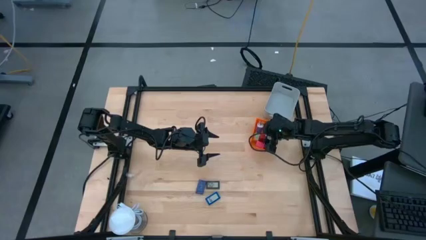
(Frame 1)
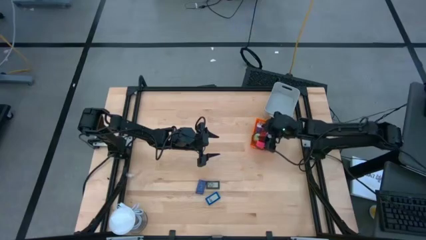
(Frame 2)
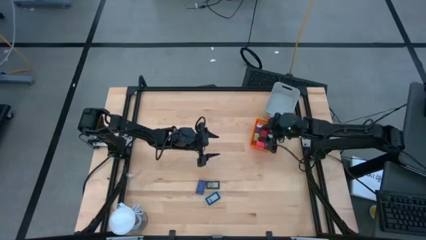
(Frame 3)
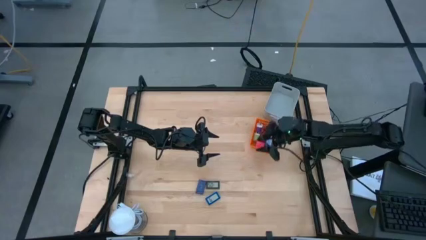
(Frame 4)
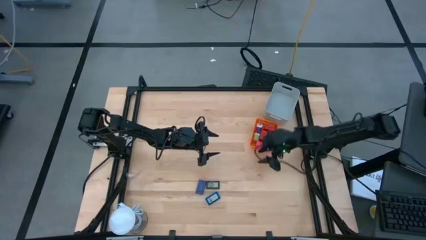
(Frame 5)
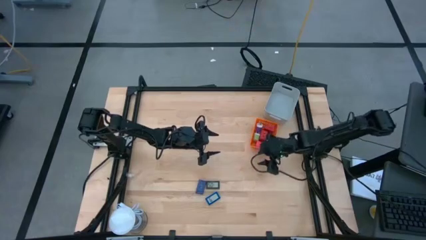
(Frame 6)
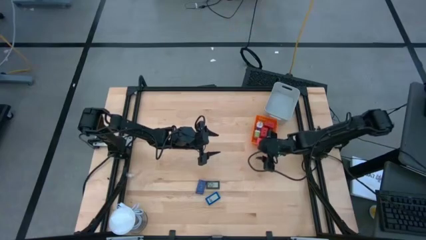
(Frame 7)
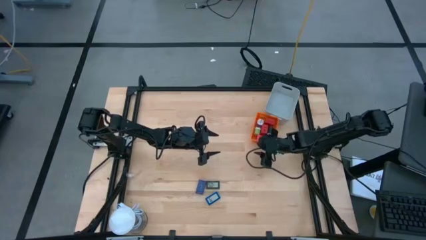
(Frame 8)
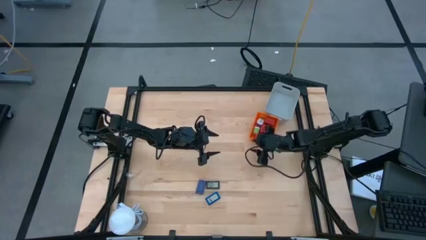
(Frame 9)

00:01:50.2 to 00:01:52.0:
Task: Pick & Place Office items
Adjust the orange bin

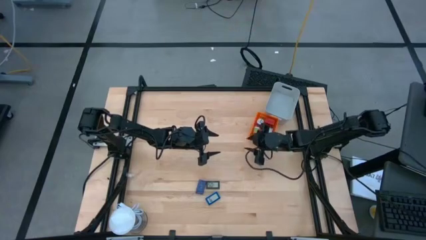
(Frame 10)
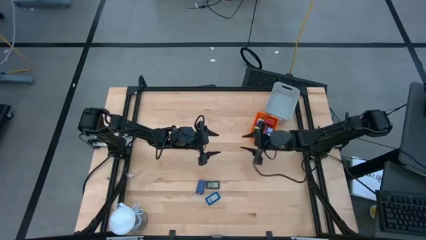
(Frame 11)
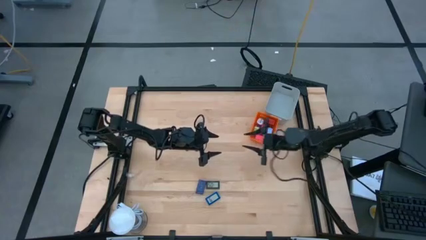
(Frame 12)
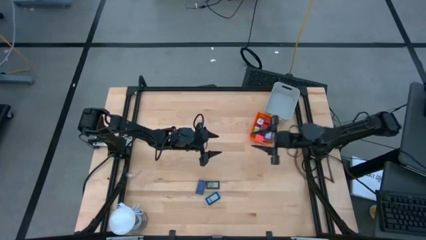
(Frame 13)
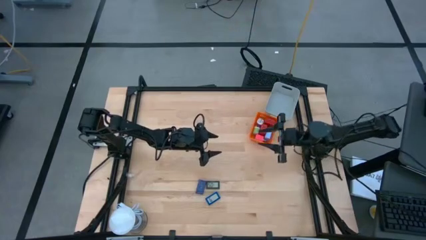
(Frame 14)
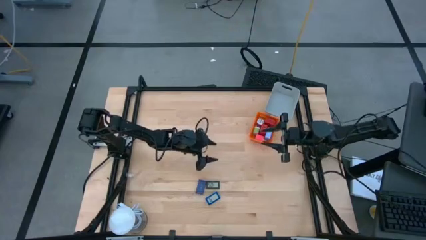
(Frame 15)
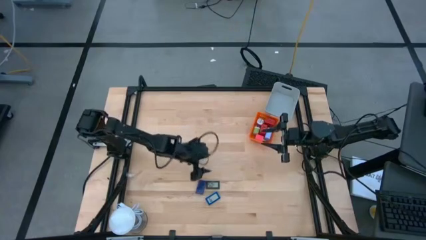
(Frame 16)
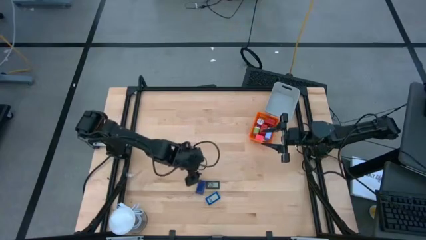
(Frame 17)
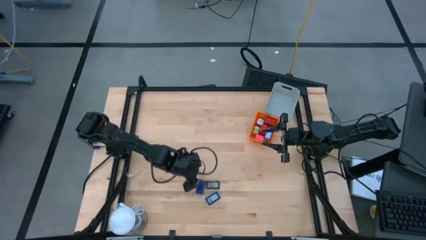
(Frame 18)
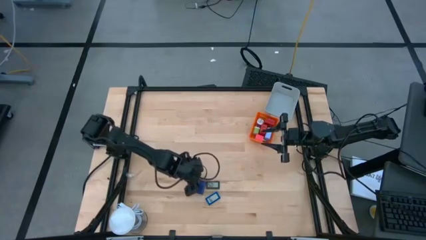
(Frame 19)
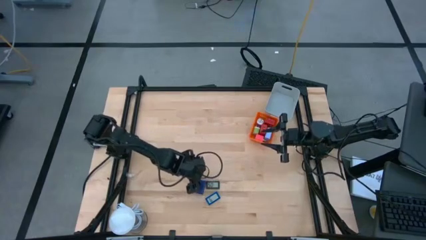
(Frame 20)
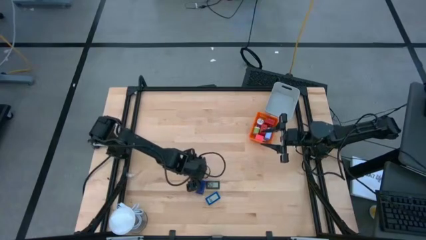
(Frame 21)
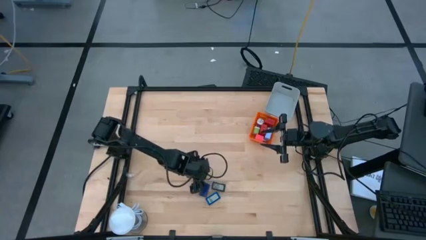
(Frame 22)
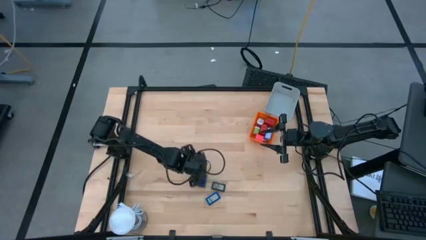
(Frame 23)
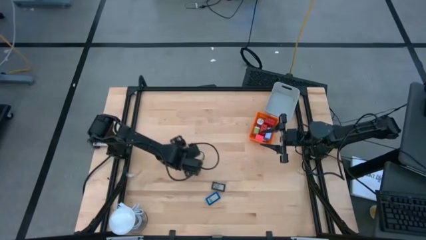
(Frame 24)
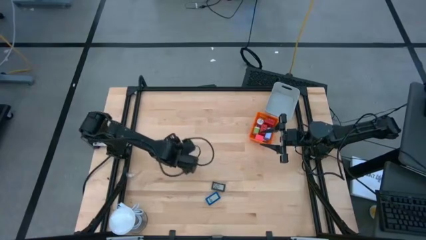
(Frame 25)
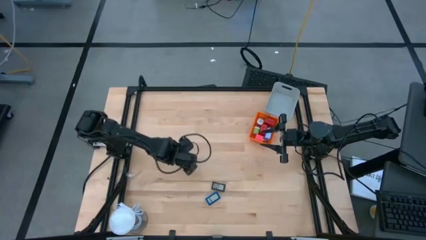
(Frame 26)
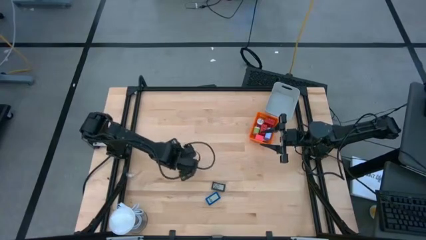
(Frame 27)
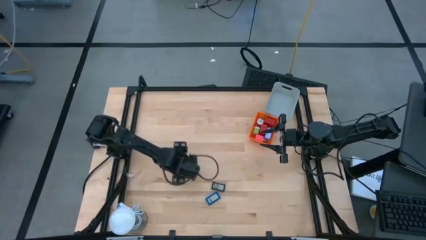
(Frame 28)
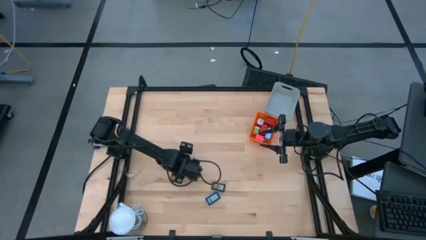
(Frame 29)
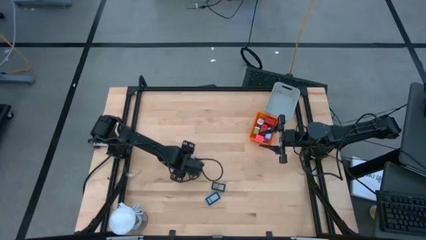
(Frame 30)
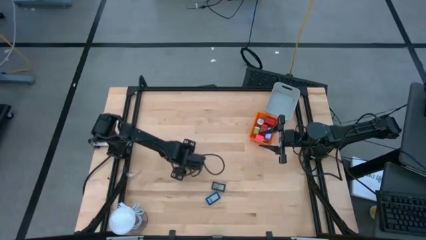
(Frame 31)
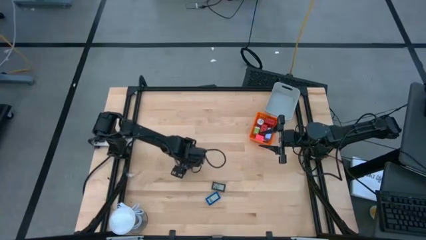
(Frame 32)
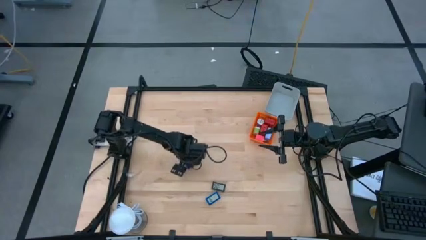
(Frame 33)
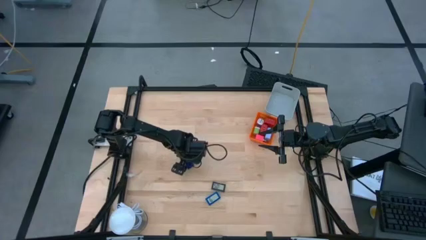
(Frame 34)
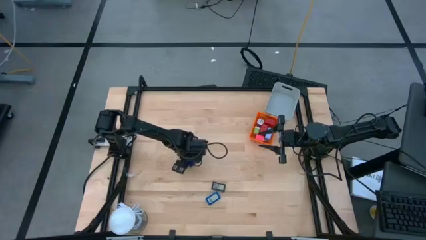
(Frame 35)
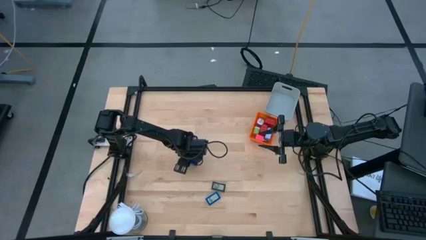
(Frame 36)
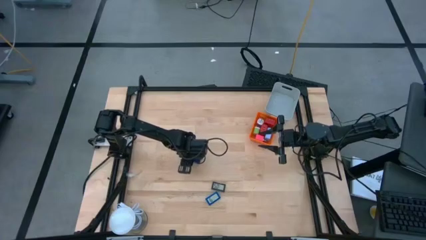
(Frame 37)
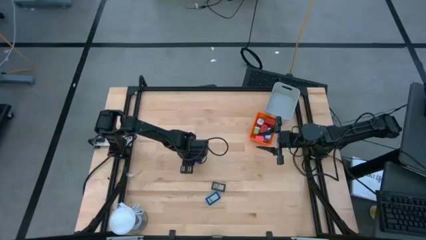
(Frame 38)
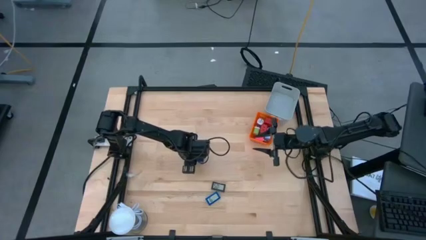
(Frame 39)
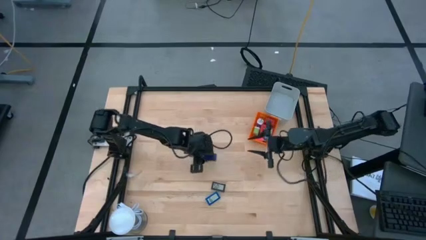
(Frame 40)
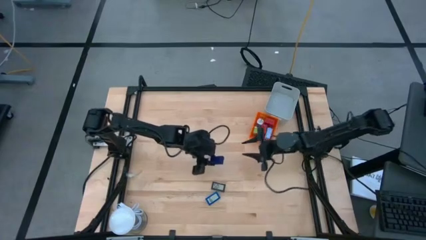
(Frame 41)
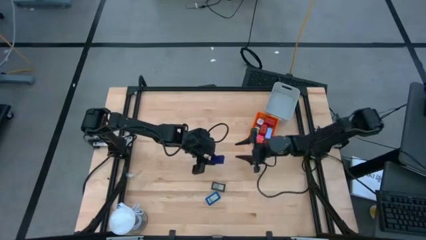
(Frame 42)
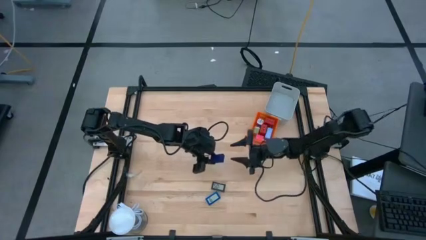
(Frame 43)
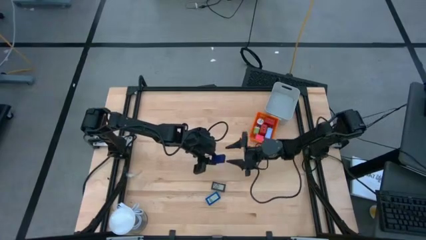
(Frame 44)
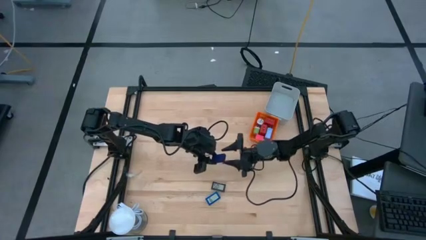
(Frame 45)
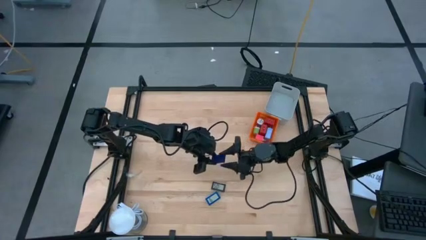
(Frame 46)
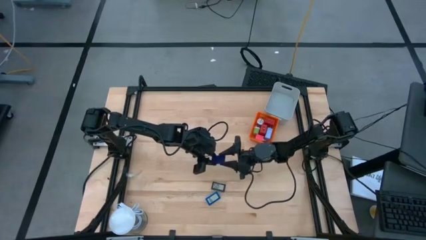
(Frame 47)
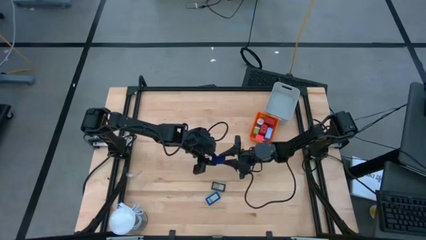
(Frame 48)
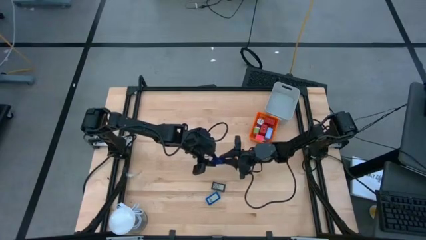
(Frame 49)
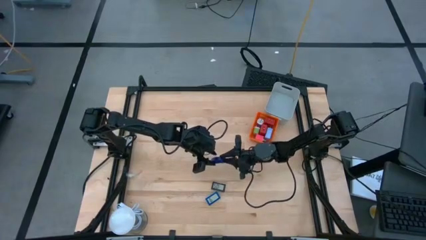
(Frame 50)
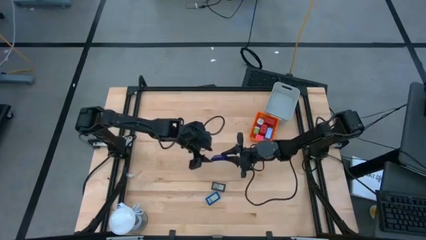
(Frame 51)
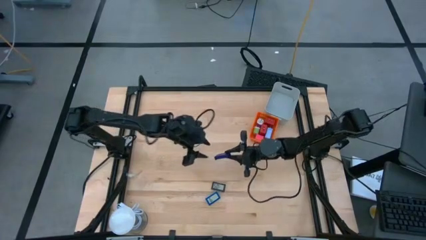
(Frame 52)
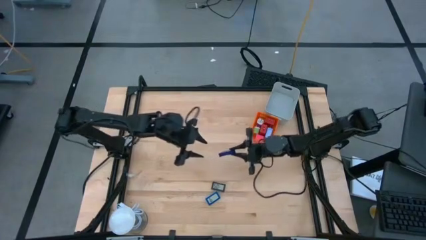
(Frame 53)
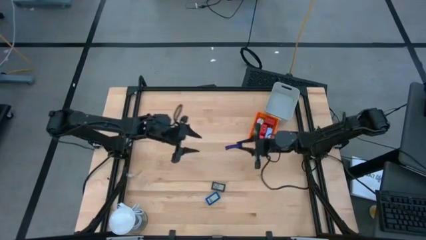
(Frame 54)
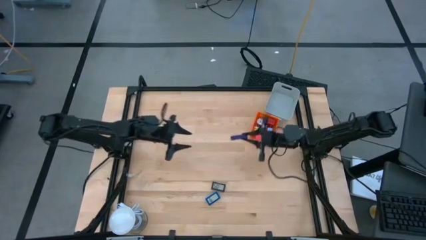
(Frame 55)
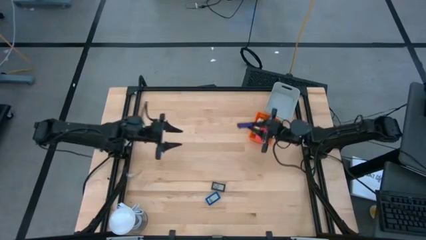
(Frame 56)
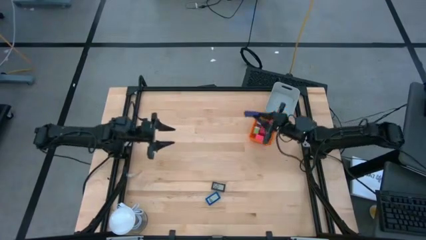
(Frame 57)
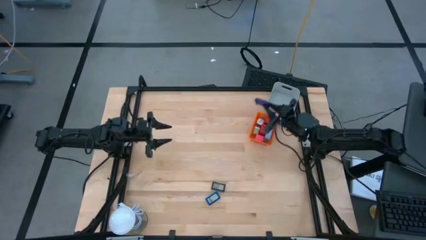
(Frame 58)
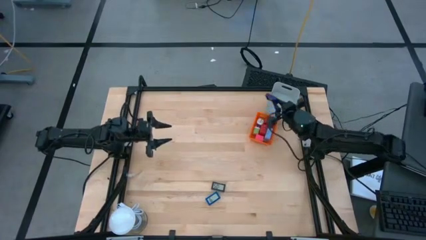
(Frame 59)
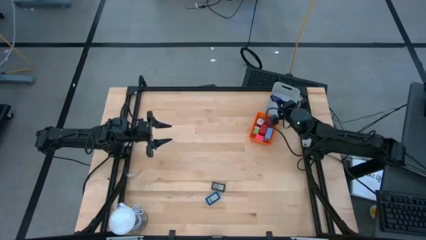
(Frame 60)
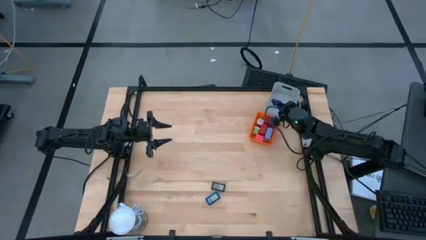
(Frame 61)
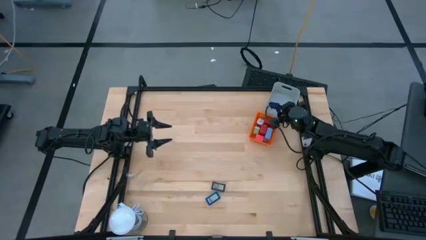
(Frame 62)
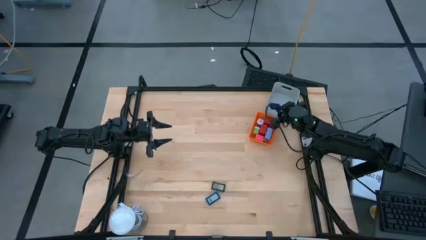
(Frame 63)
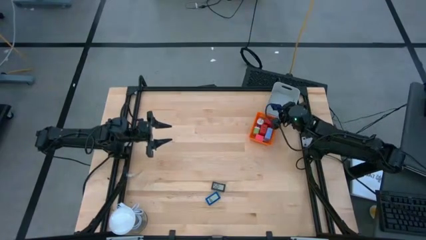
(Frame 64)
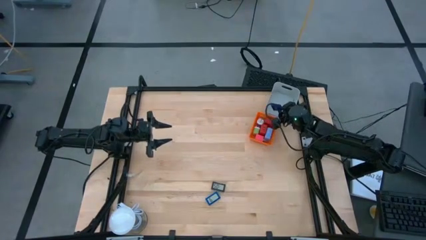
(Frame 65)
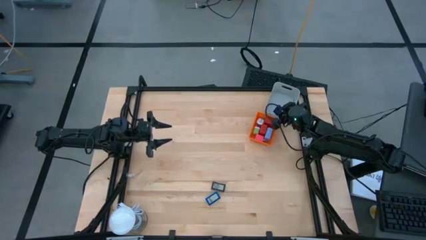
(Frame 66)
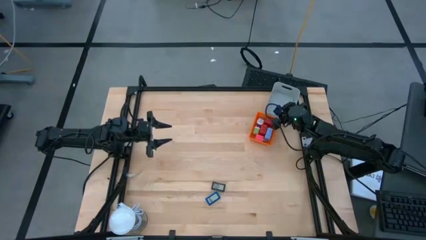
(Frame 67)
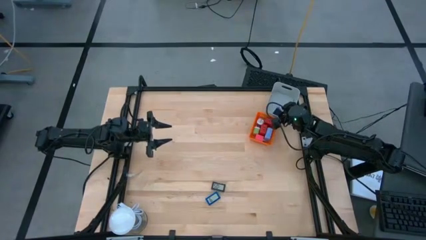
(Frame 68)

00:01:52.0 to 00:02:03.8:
Put the left blue digital clock into the gray bin

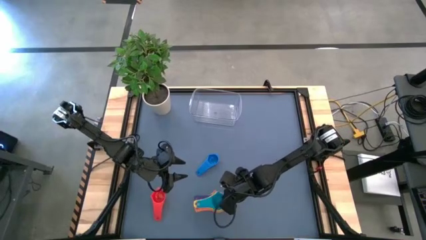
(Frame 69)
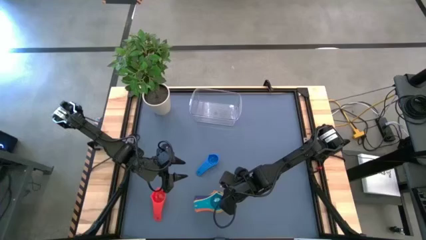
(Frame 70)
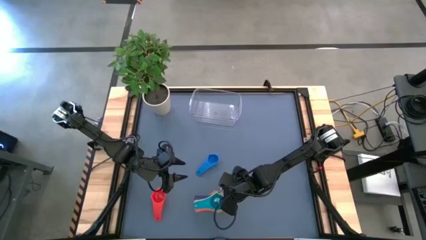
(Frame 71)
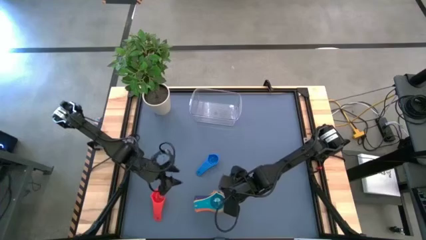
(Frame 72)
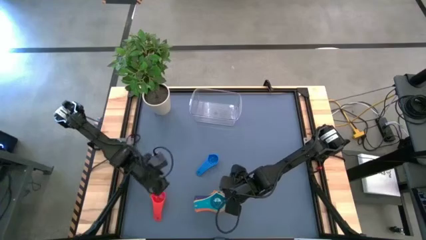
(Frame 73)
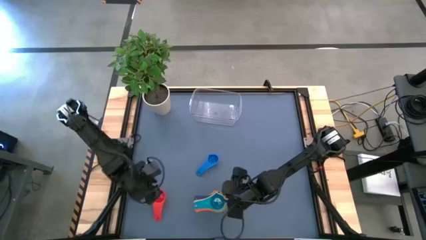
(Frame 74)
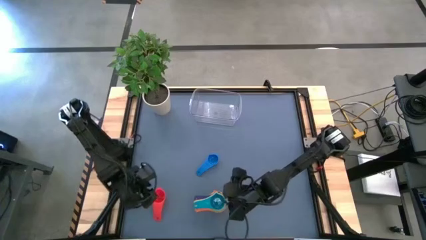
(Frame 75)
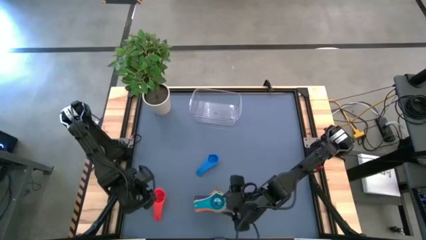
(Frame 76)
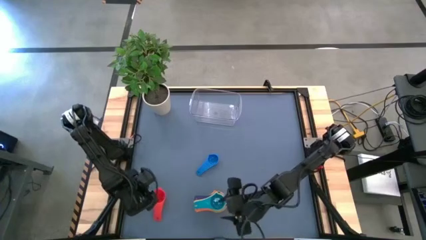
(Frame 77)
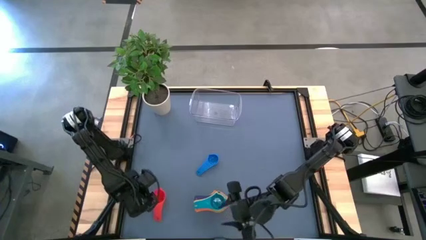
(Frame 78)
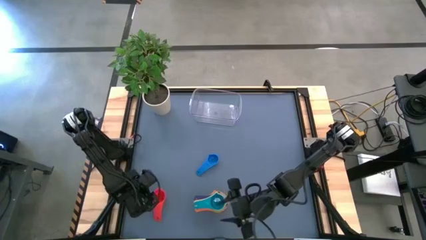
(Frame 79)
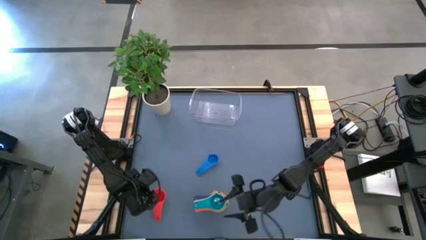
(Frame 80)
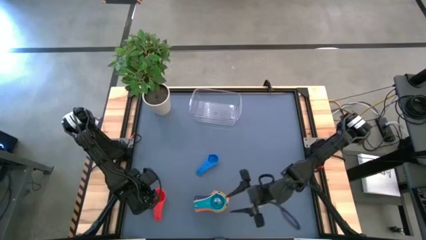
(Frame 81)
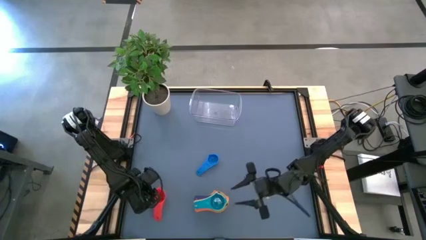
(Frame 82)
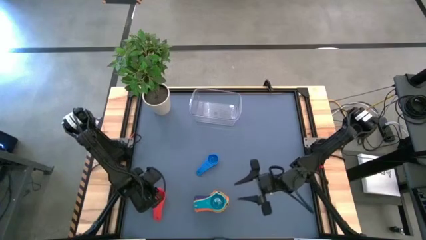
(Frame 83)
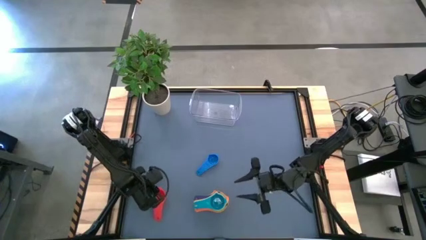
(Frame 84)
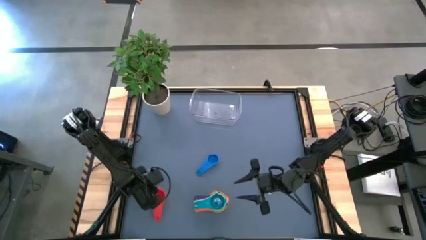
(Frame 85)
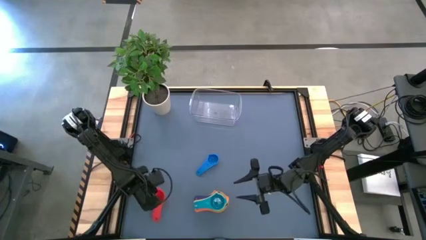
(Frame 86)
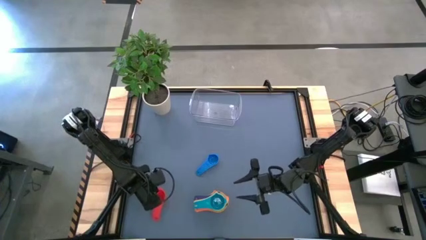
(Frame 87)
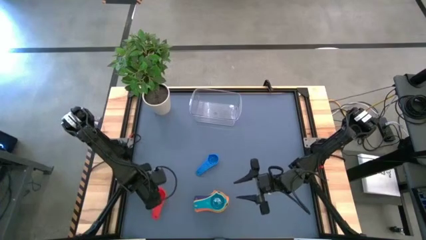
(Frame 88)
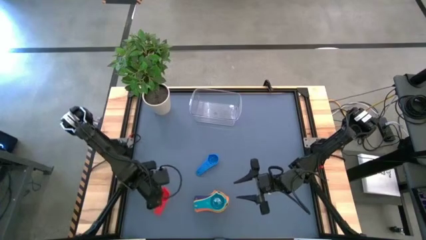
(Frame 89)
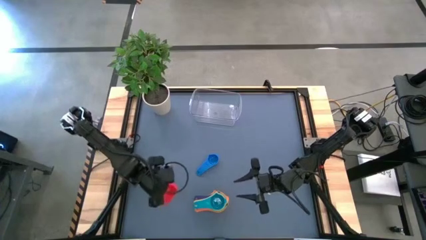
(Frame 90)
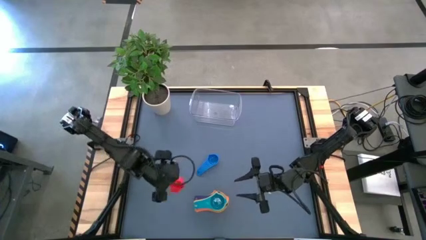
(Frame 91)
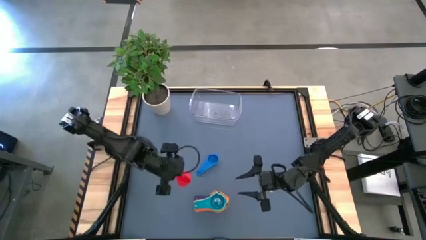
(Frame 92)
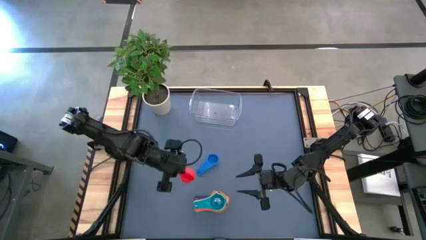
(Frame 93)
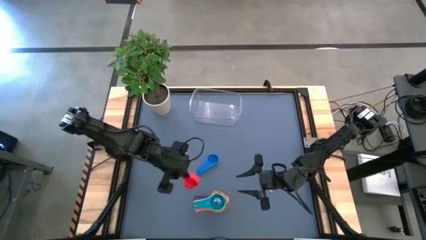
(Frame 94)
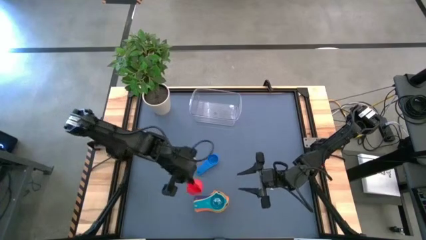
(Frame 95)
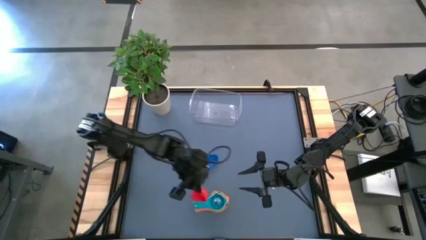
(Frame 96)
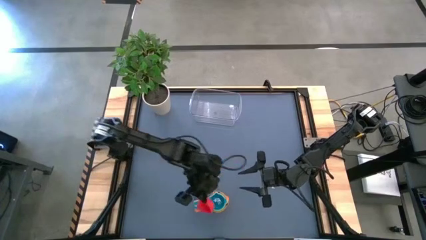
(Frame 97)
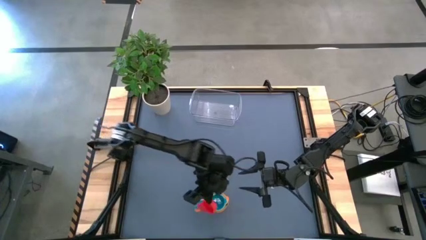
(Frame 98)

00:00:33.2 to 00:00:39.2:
Task: Nest measuring cups in basket
Stack the red measuring cup on top of the light blue measuring cup
